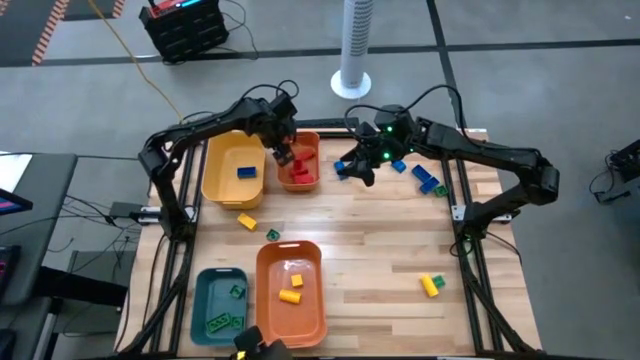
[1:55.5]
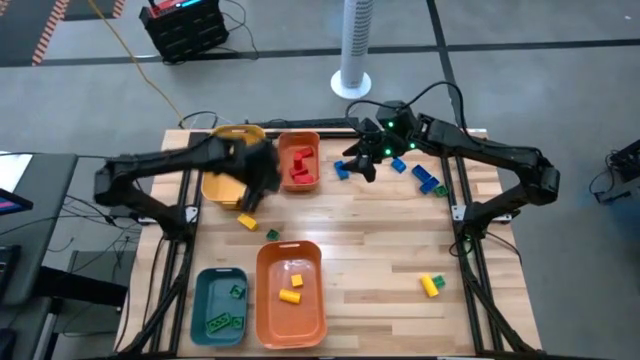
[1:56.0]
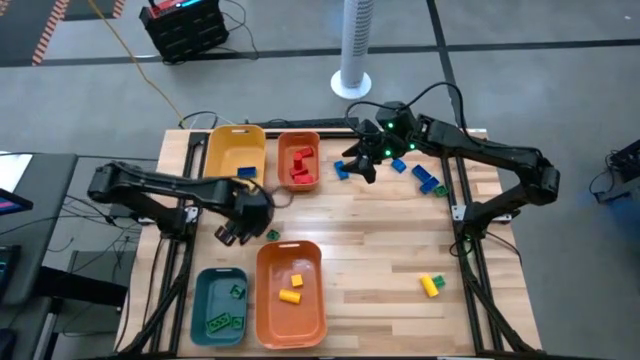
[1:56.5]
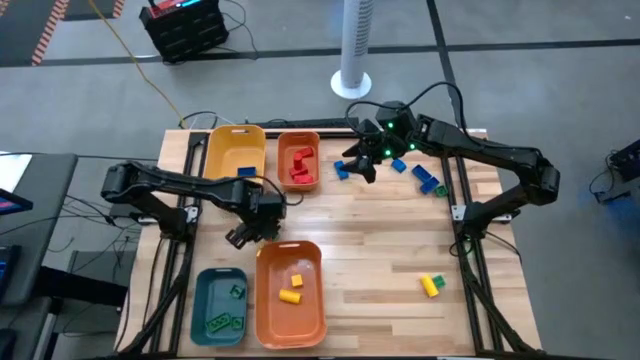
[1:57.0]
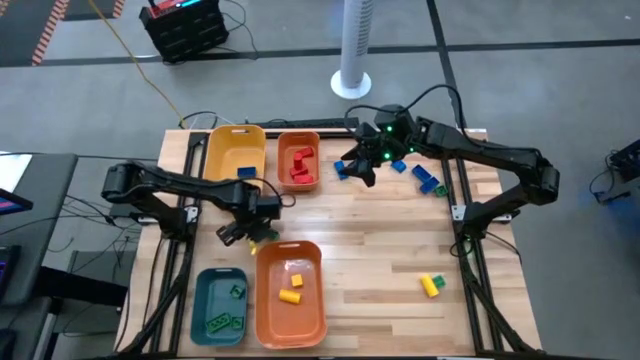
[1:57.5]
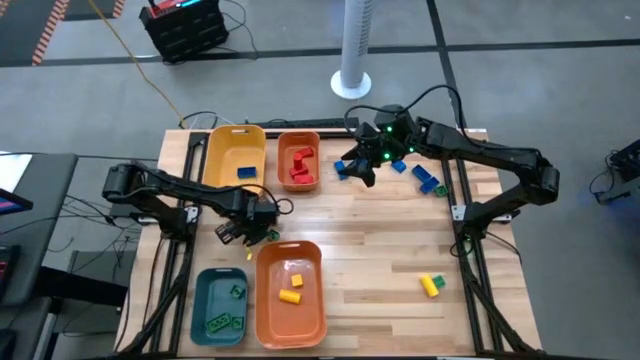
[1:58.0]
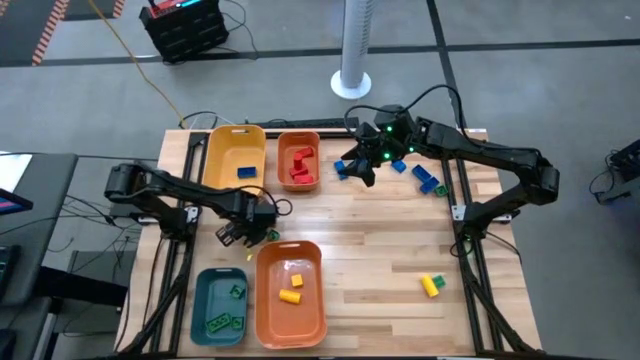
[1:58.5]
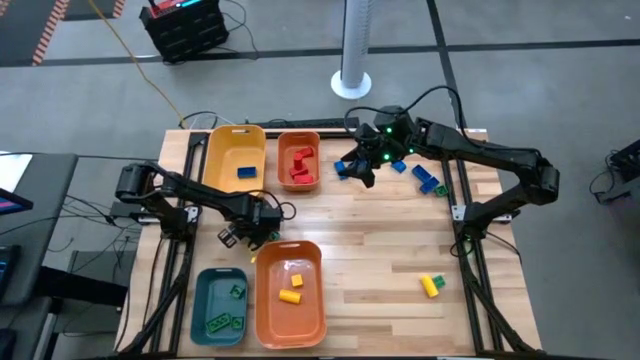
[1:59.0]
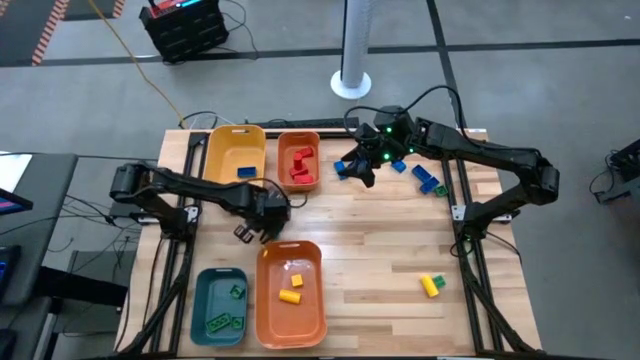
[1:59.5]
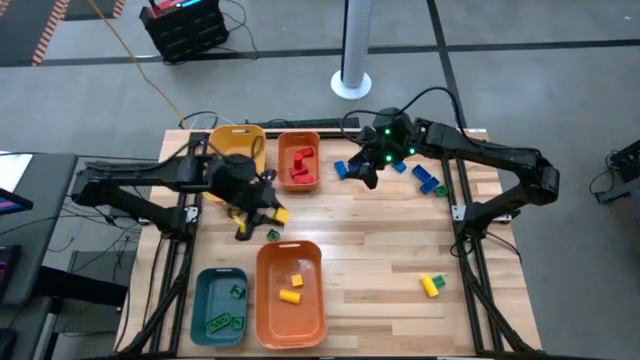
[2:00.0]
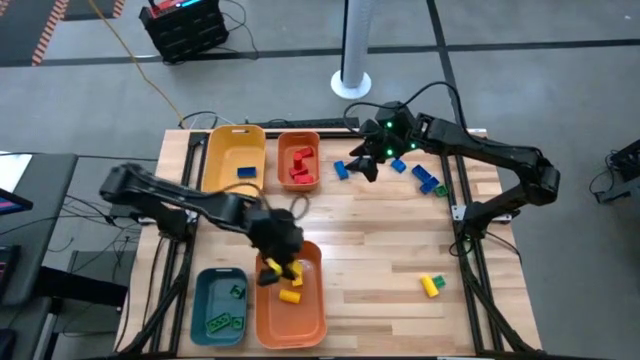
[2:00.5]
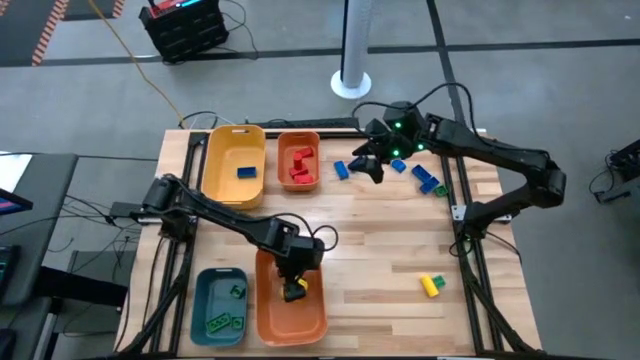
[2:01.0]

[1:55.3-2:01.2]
Task: Sort blocks
Put the yellow block into the bottom orange bin

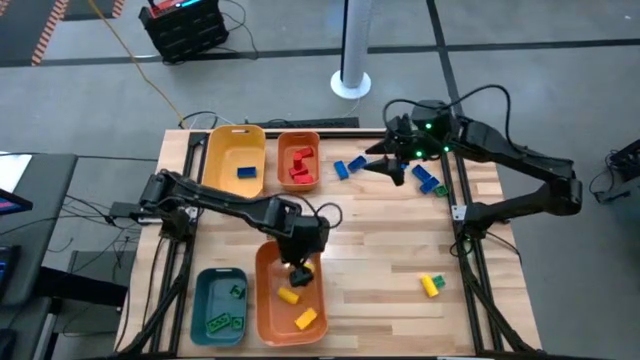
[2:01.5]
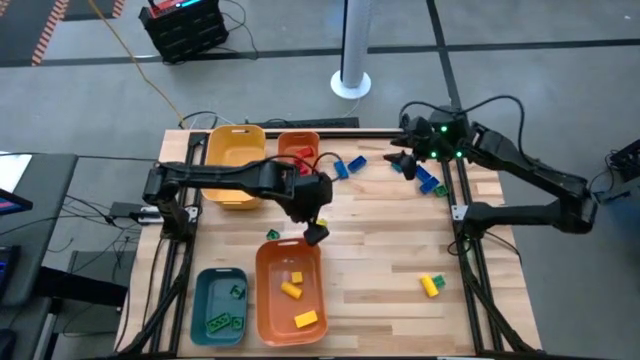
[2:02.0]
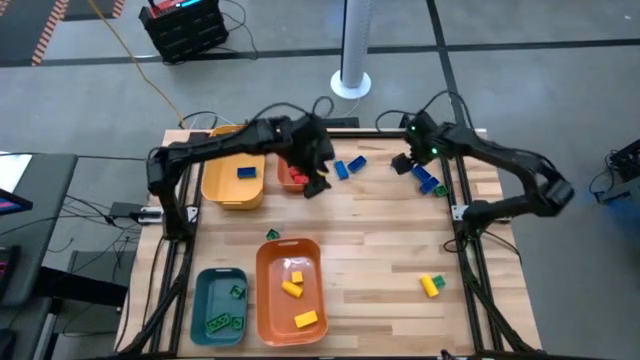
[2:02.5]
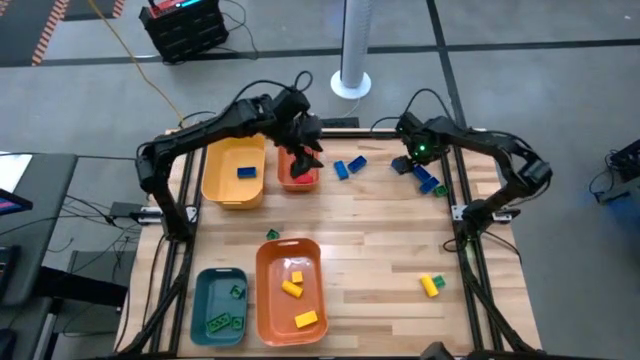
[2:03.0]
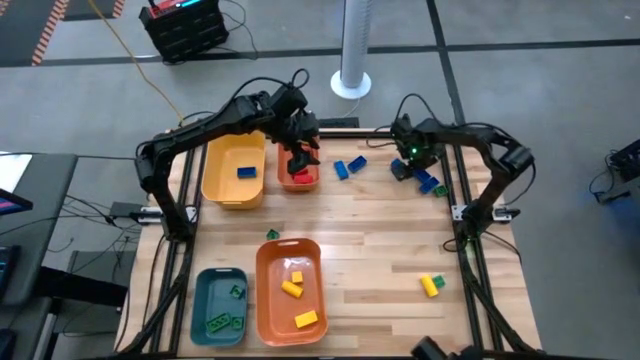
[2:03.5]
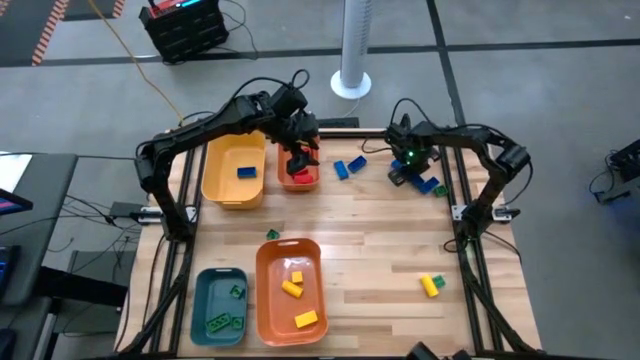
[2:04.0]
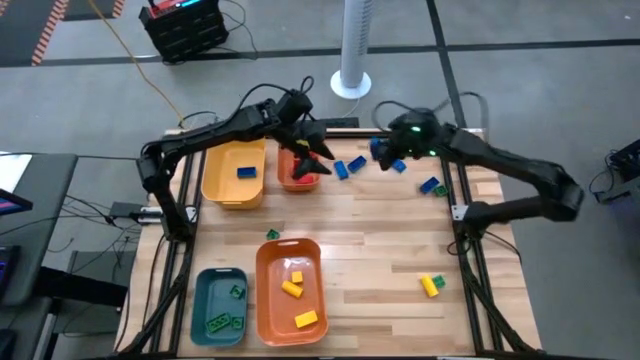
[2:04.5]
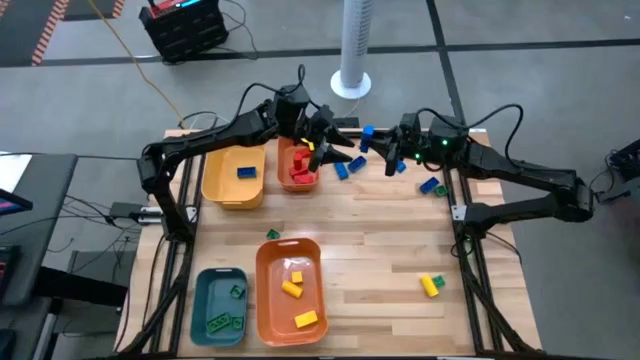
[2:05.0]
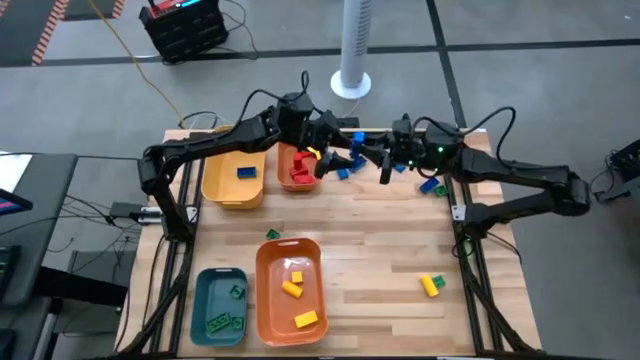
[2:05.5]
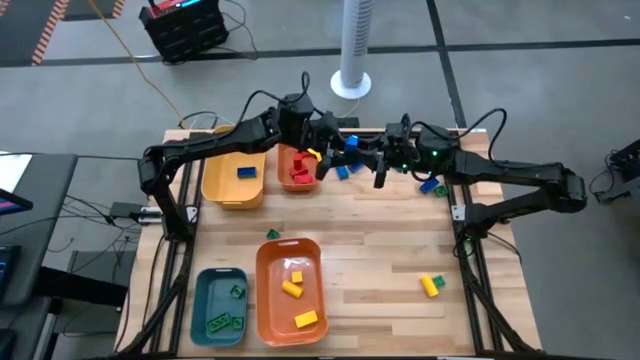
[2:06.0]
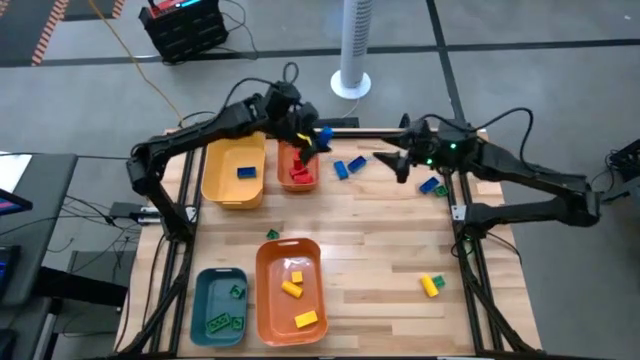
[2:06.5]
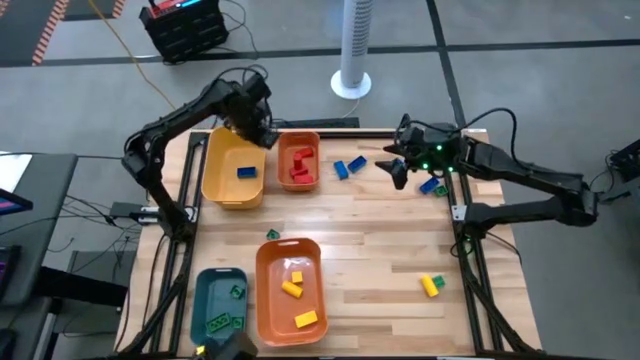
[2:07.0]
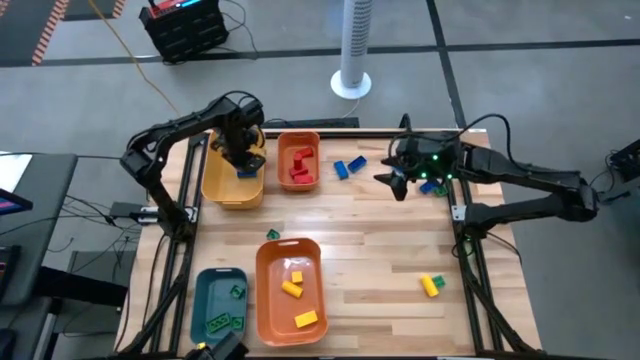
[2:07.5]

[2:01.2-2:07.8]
Put the blue game piece into the yellow bin

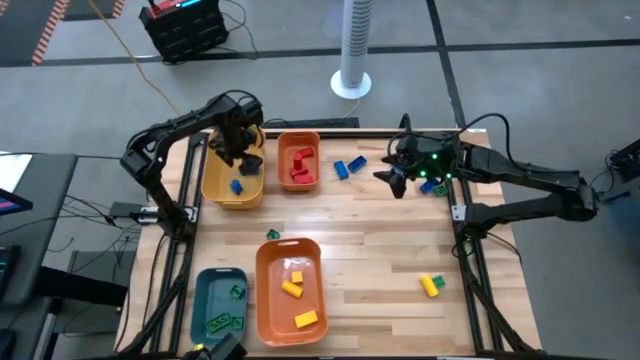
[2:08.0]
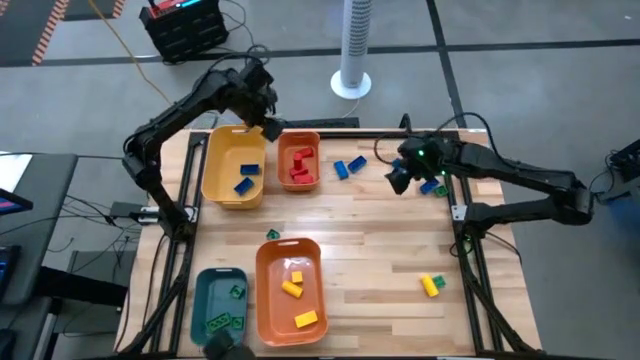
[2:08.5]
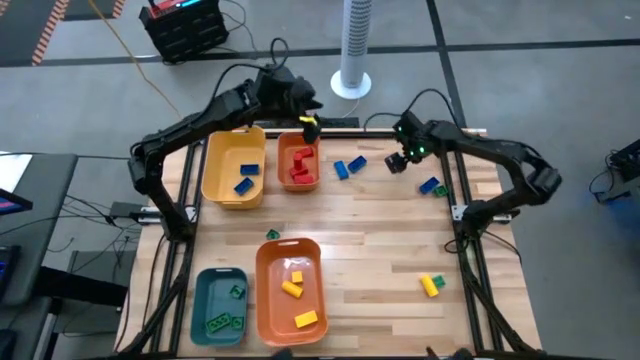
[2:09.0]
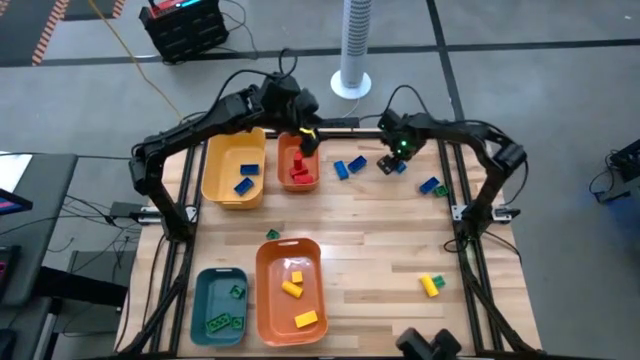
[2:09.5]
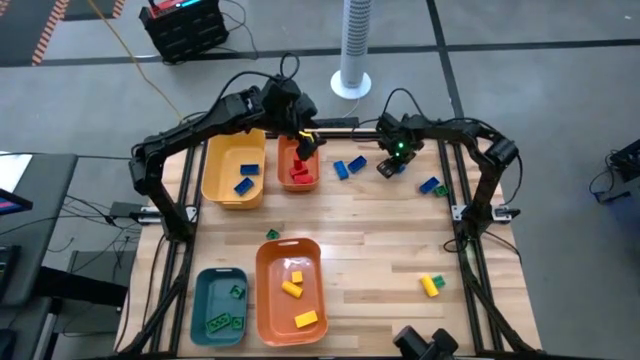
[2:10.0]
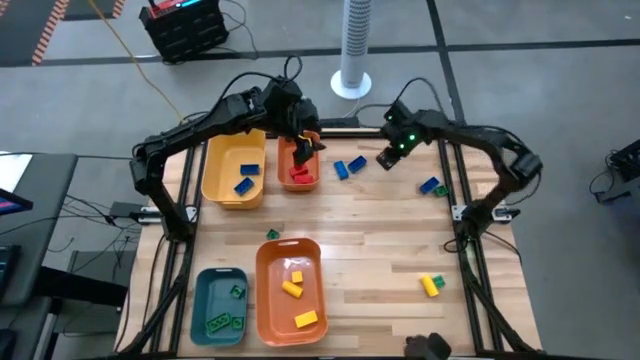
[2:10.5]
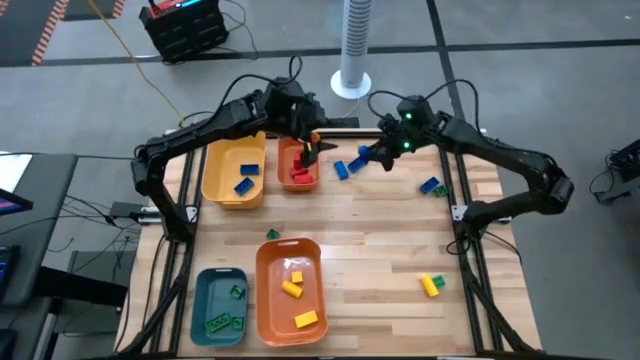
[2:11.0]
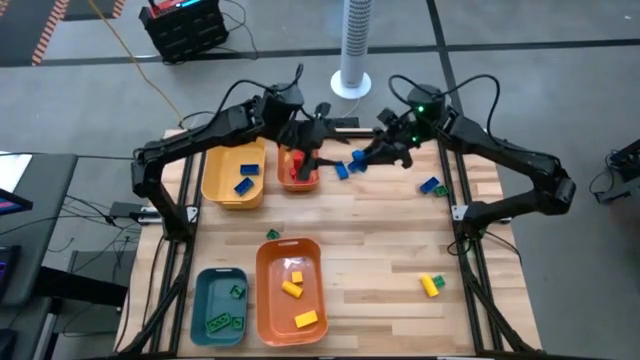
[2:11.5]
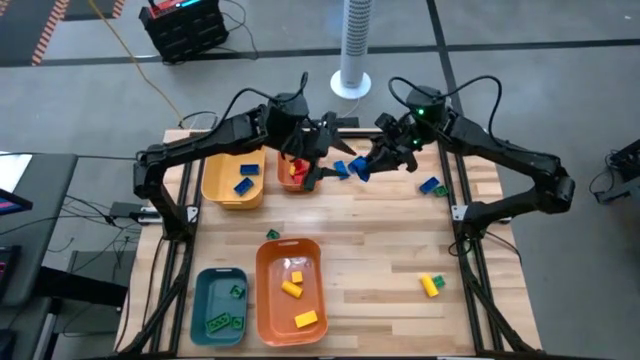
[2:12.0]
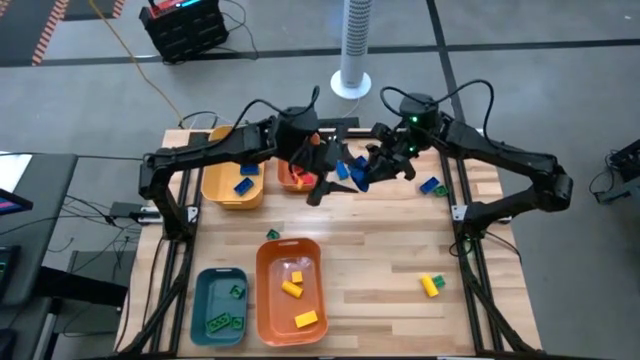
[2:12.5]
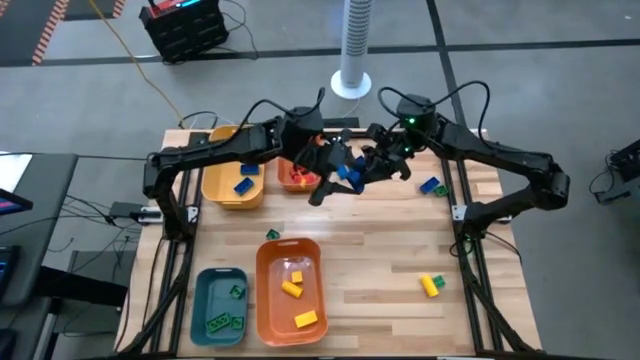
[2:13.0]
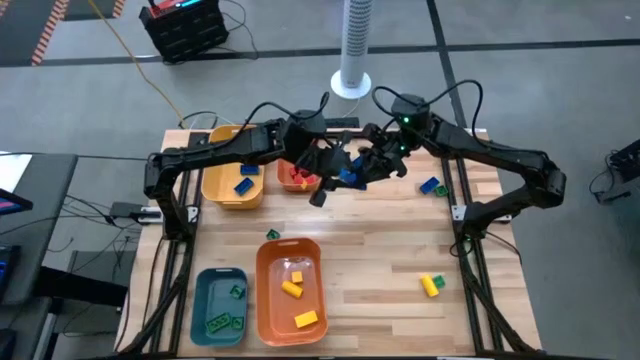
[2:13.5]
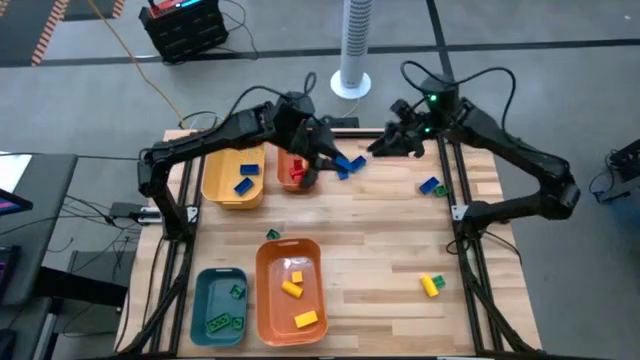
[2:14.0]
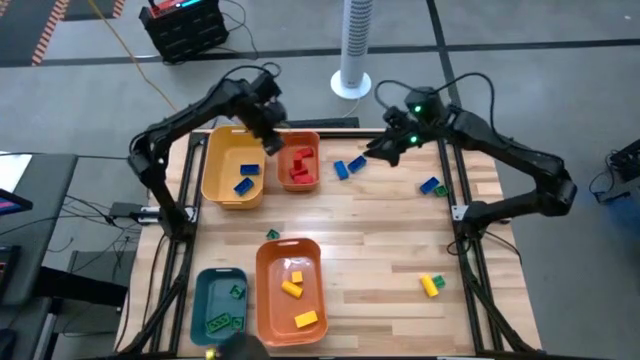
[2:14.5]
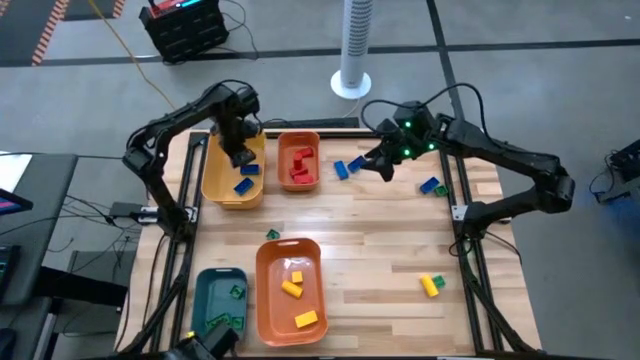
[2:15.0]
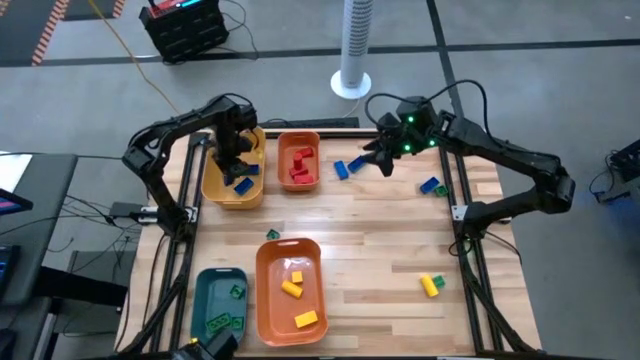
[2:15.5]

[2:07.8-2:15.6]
Put the blue game piece into the yellow bin

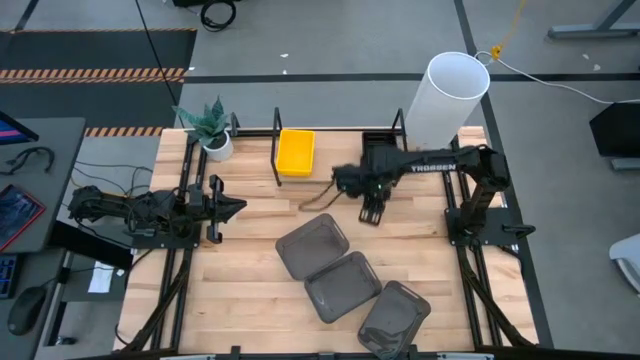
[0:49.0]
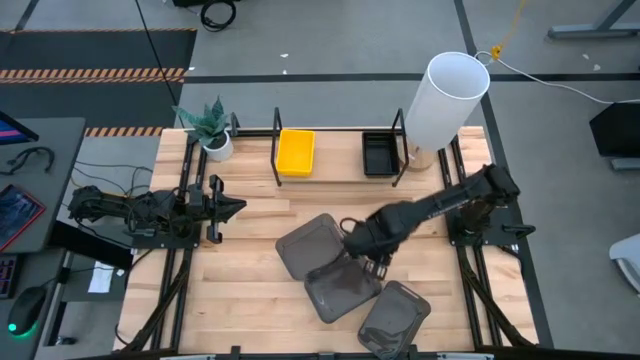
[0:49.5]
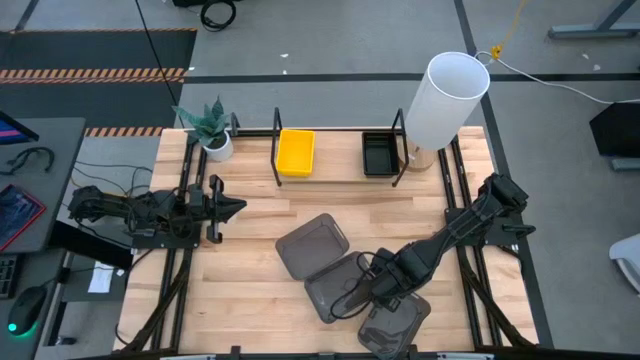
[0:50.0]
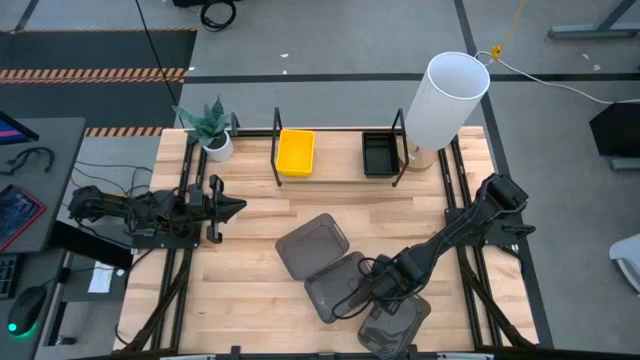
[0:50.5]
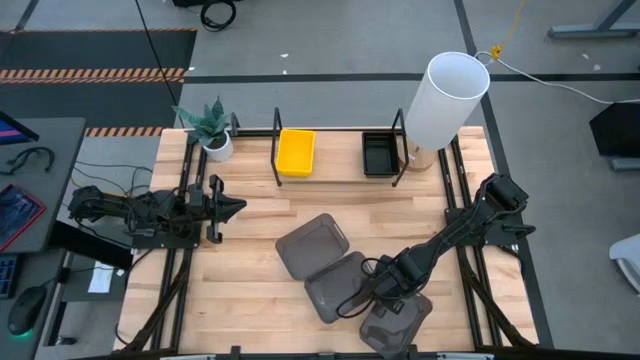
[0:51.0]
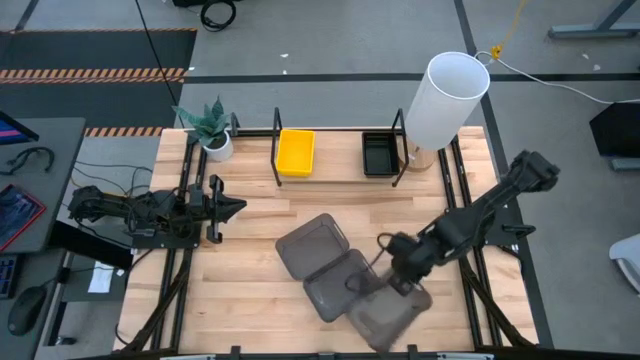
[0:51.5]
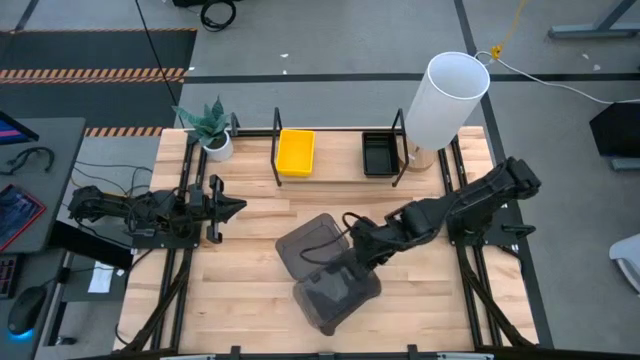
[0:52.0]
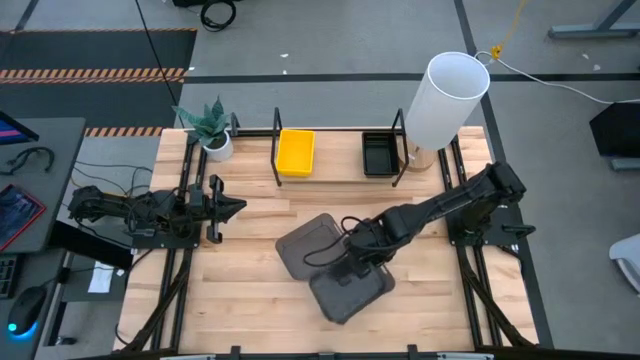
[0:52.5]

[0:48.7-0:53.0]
Task: Stack baskets on shelf by color
Stack the bottom transparent black bin on the middle transparent black bin
